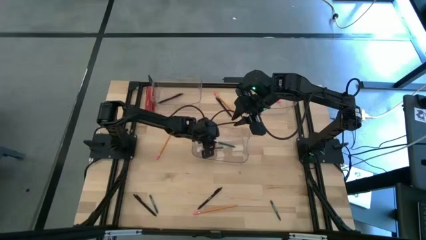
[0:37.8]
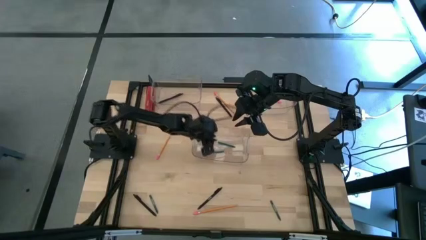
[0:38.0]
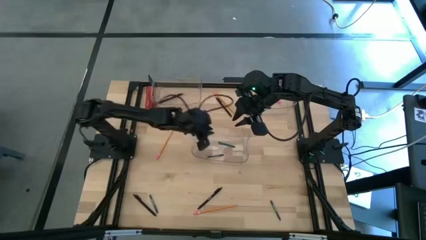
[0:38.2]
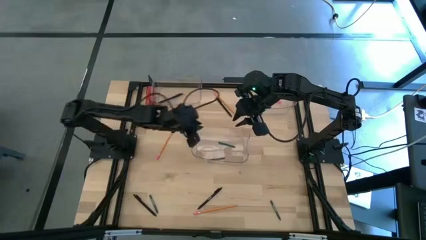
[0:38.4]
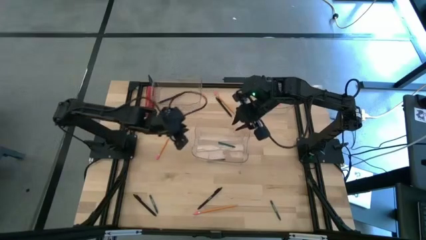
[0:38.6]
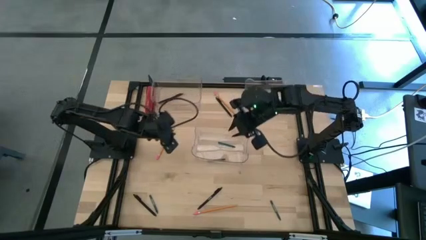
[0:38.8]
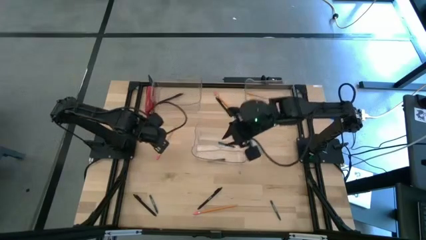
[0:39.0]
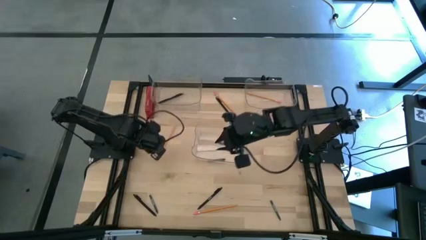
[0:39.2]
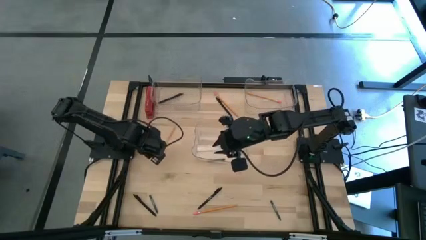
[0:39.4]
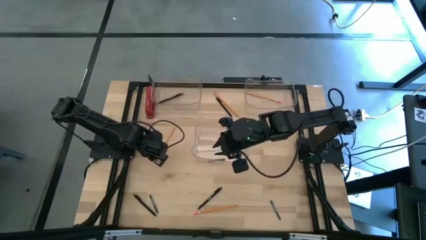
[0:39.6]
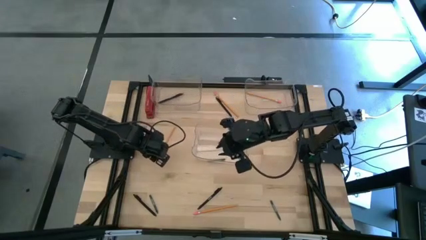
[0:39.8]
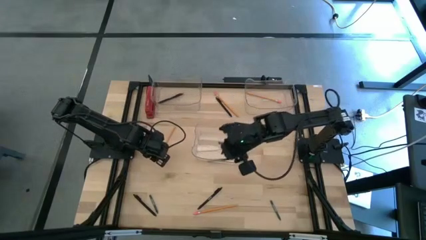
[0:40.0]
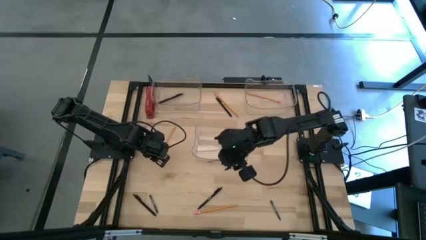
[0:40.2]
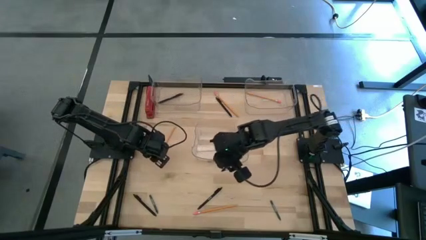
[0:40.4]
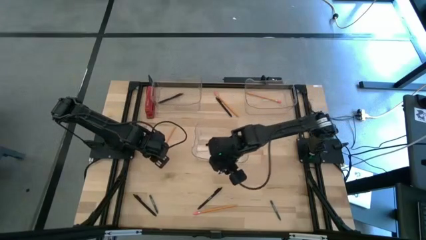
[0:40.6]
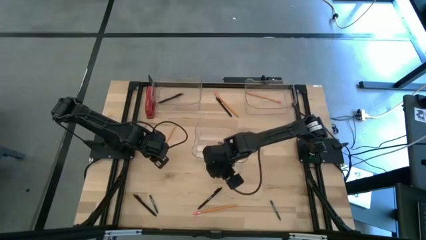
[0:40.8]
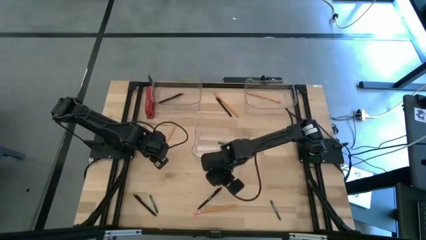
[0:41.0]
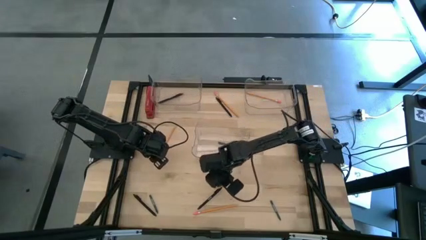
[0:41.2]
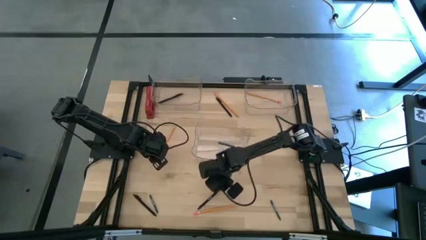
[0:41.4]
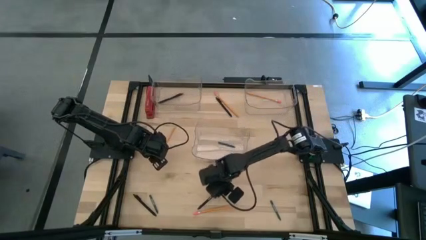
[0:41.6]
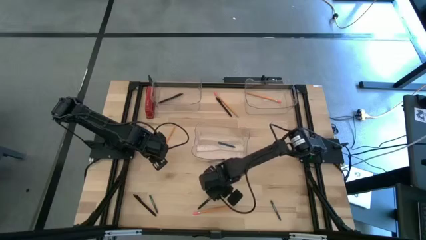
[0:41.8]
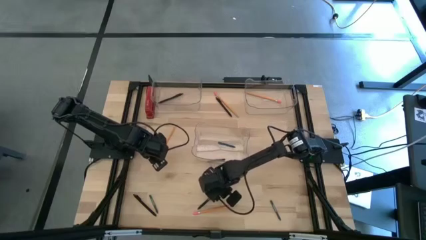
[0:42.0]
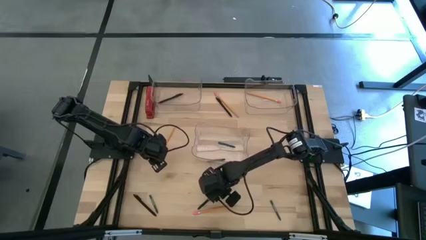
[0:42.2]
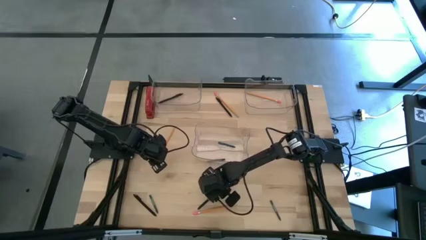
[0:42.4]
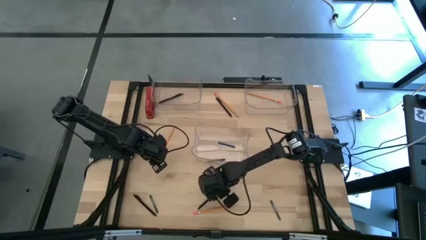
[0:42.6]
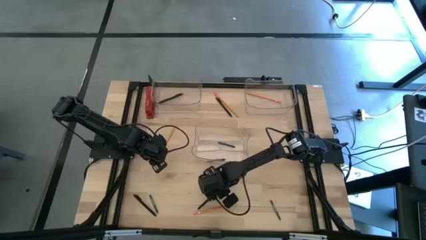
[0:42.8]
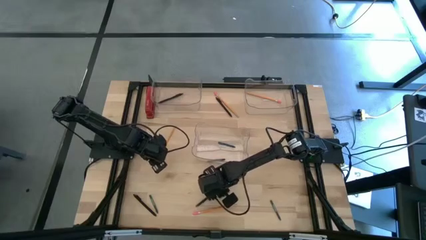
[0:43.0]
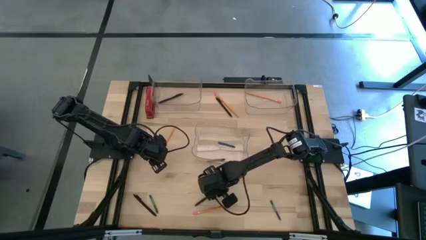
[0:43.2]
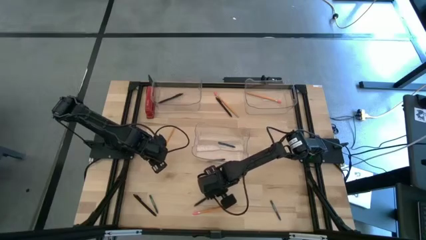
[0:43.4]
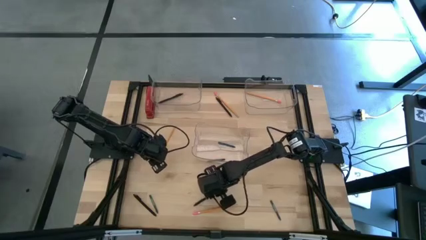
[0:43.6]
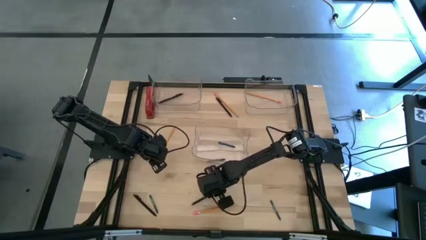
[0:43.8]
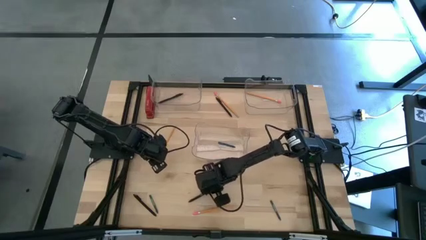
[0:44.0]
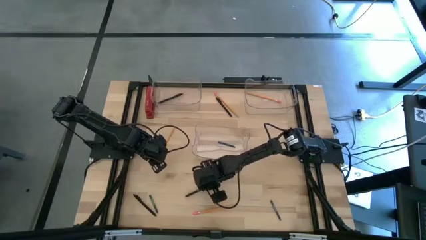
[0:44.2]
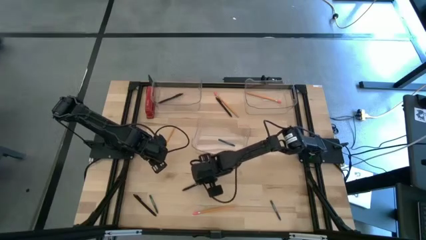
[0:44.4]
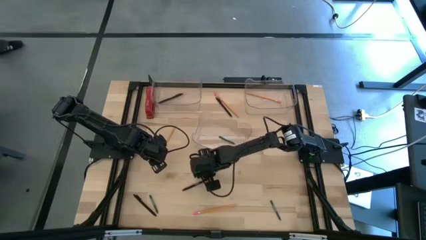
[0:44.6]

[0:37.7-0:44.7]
Task: Sort crayons/erasers/pens/pencils in bins
Put the black pen into the top left transparent bin

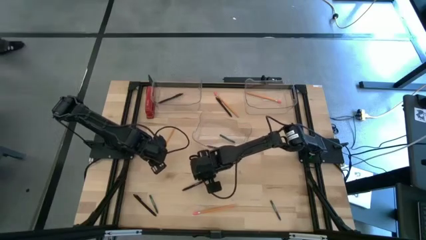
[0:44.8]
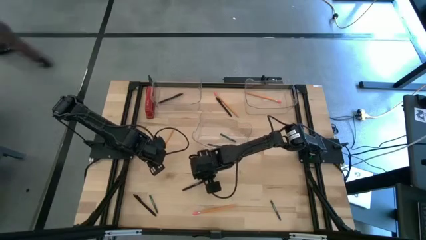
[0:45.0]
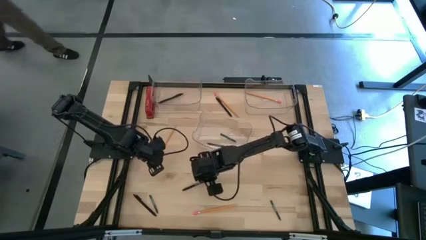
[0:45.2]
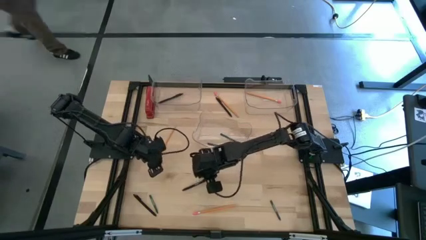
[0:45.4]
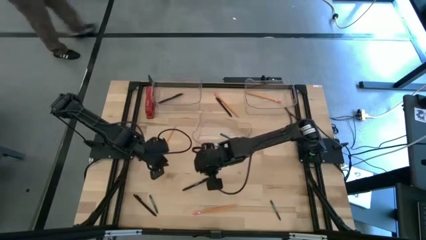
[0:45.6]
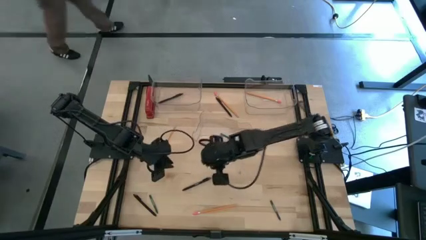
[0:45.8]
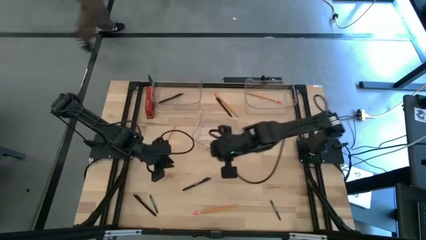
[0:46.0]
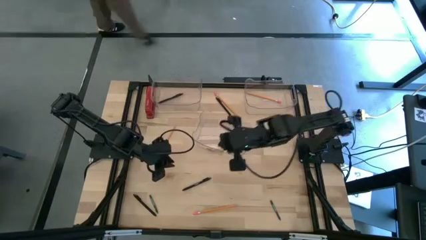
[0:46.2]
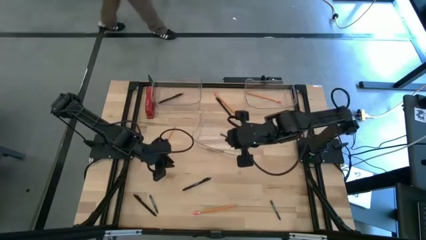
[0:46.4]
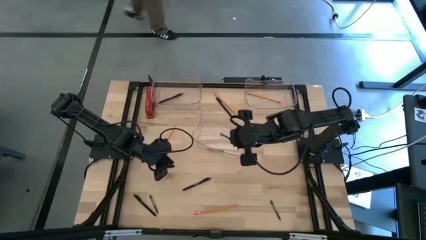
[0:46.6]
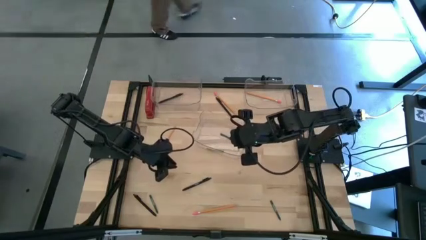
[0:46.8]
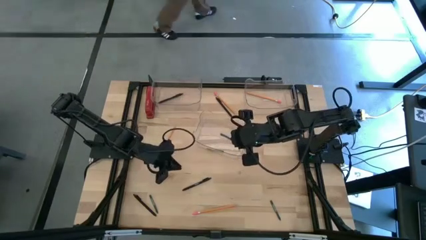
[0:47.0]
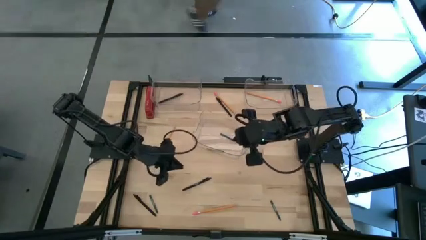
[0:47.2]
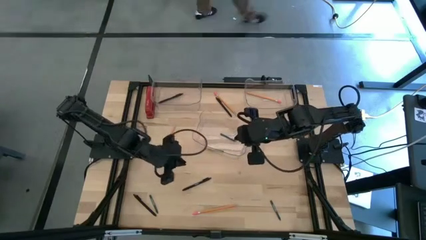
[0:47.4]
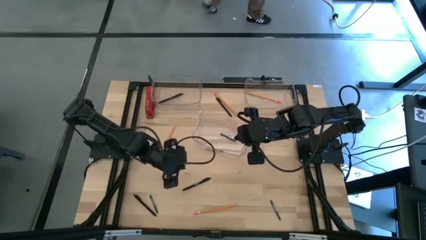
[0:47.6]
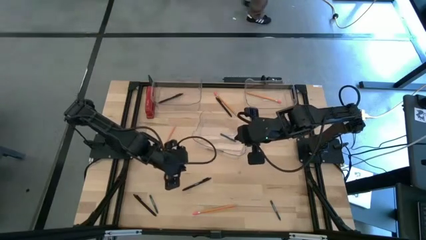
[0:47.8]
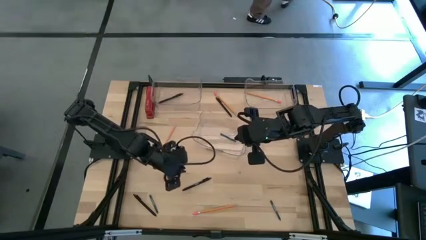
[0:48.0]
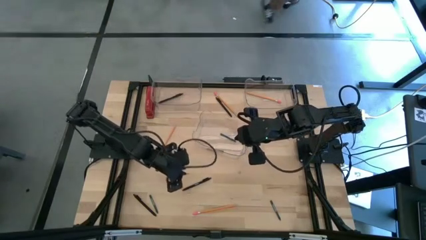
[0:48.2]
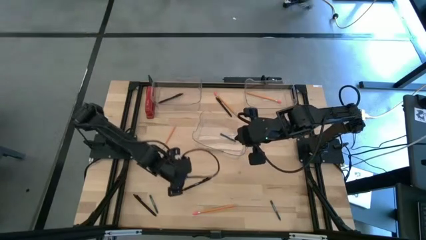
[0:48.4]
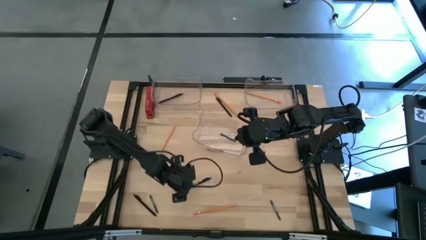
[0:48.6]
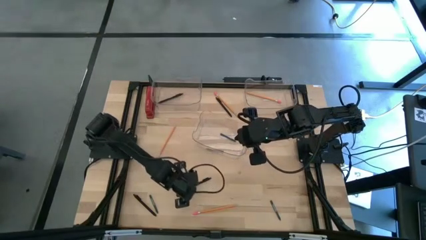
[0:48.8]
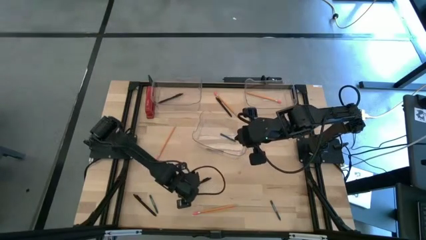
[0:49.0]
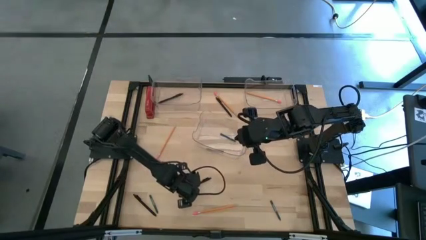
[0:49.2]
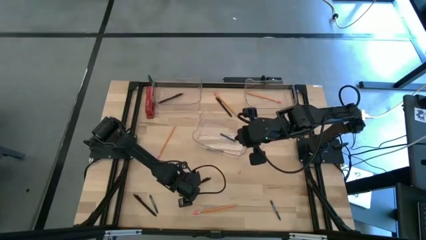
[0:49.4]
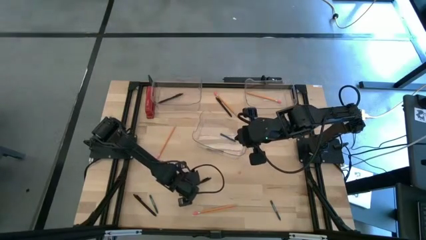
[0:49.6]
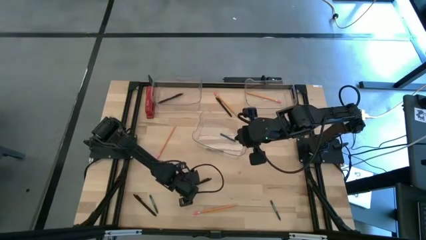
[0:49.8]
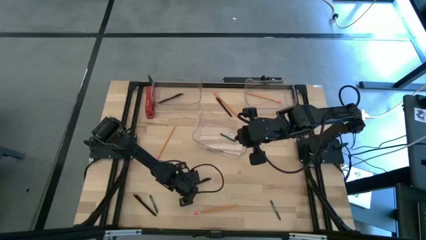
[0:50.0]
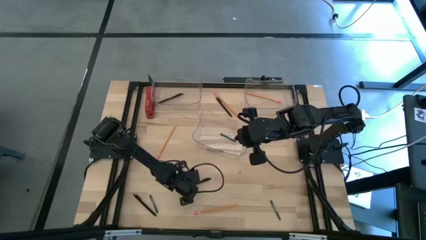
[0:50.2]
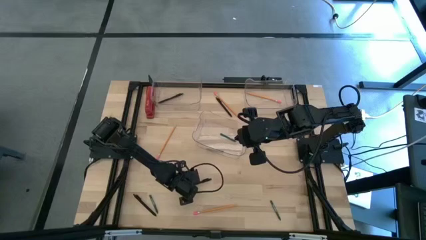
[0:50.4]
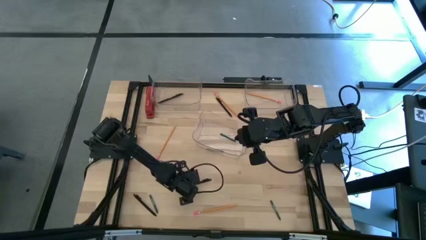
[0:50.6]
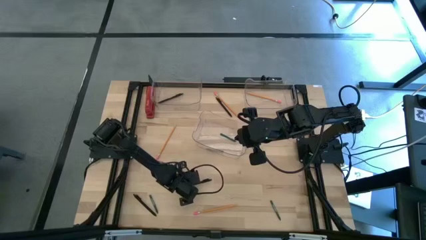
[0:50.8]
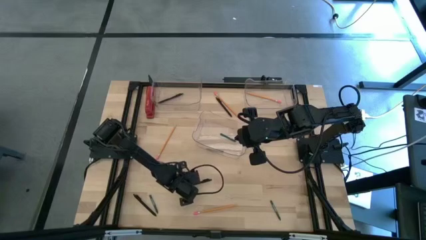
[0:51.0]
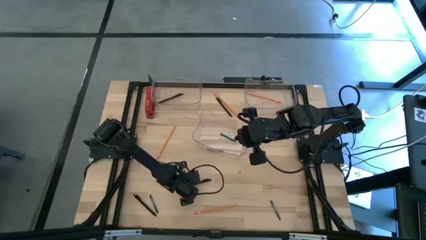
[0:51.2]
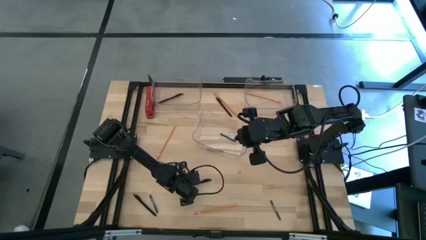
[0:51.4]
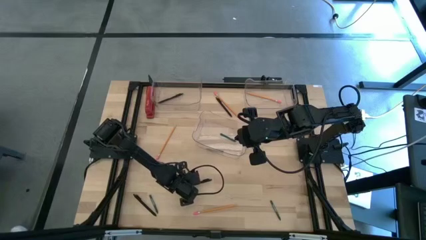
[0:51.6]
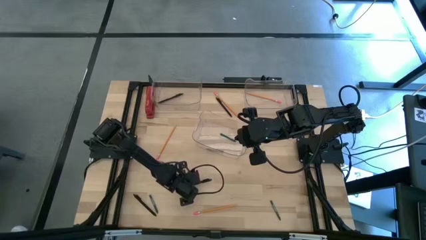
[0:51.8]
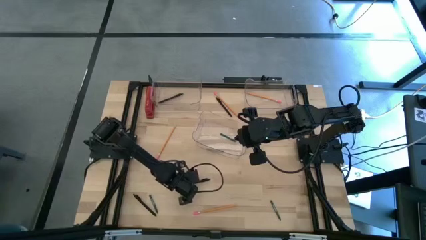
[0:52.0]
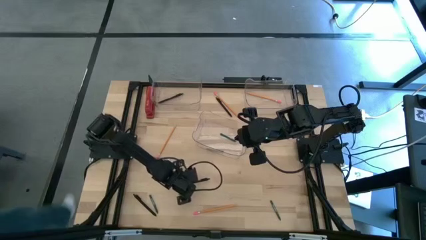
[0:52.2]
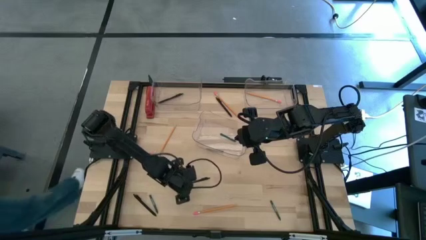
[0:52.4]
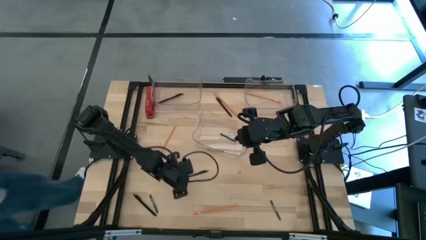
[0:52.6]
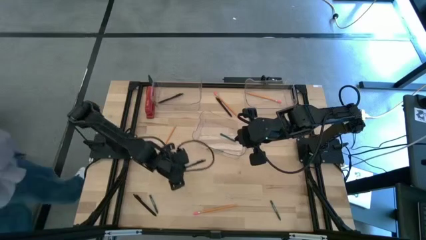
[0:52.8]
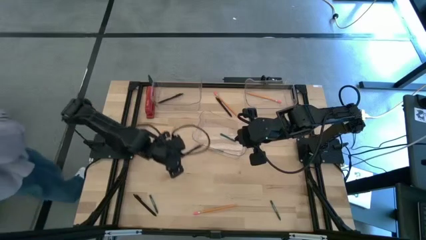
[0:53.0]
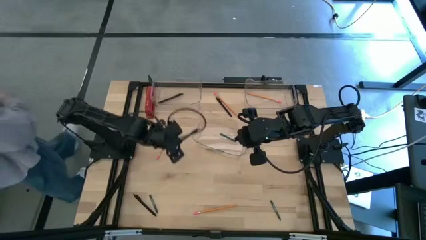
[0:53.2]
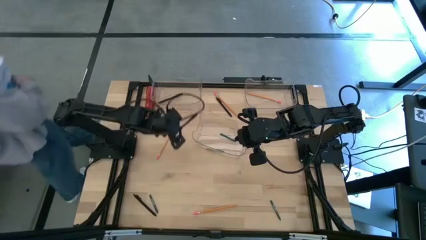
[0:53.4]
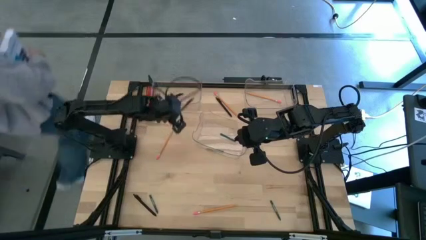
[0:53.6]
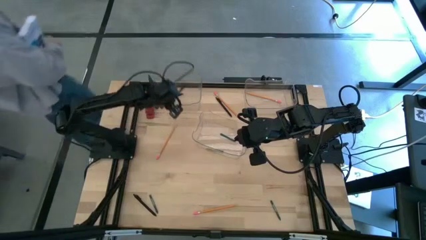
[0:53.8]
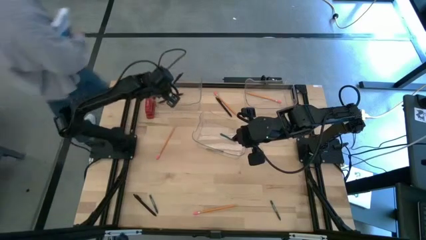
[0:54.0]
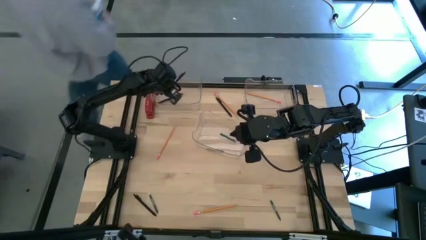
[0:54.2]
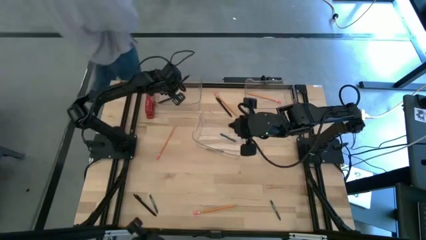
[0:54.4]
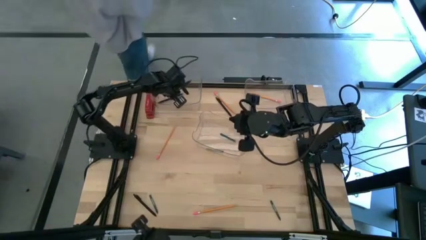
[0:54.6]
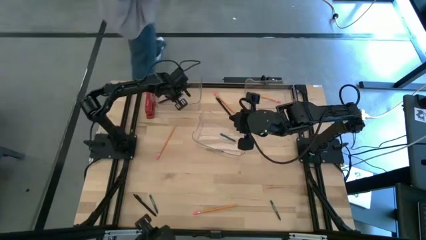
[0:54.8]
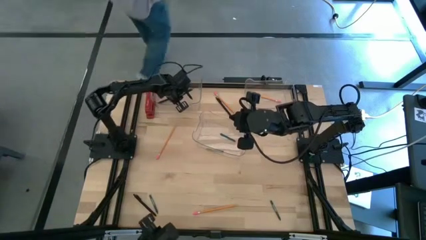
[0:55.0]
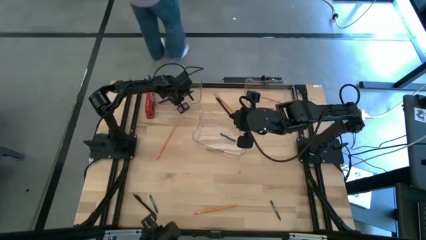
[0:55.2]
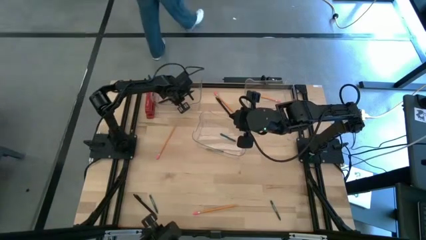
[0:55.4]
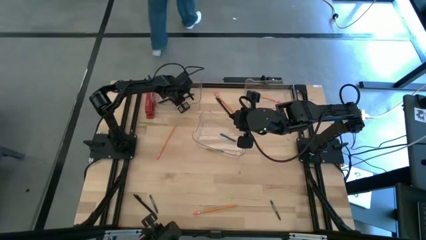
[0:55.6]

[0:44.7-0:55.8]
Put the black pen into the top left transparent bin
